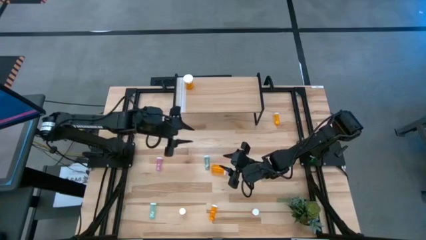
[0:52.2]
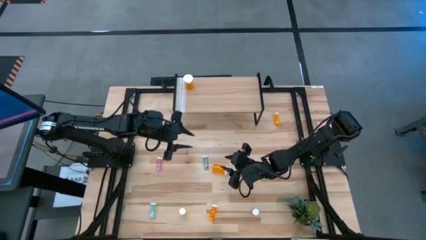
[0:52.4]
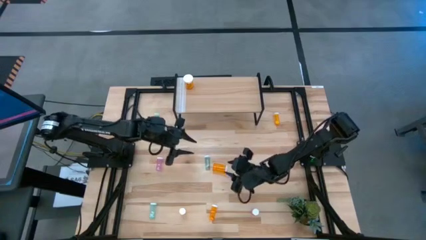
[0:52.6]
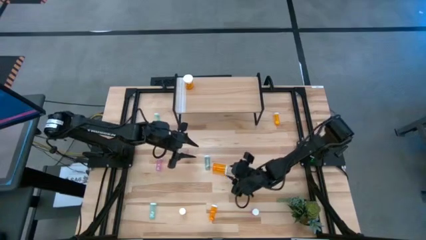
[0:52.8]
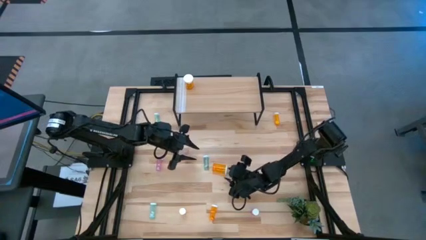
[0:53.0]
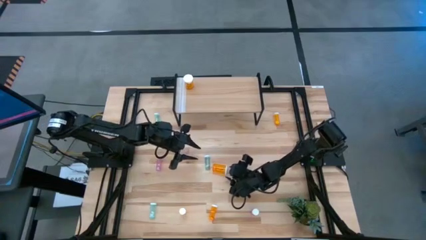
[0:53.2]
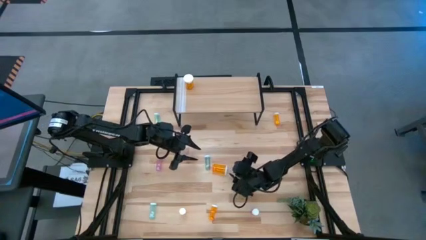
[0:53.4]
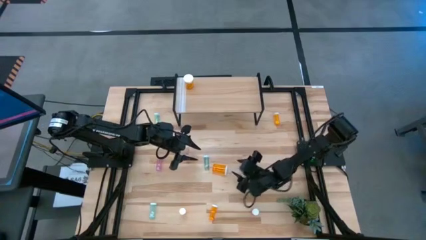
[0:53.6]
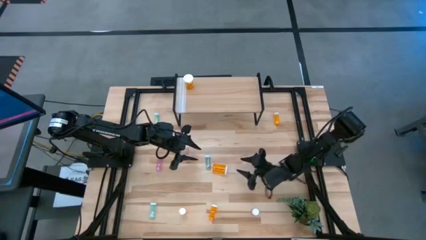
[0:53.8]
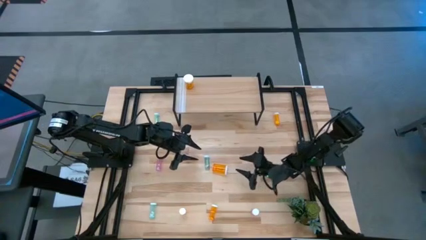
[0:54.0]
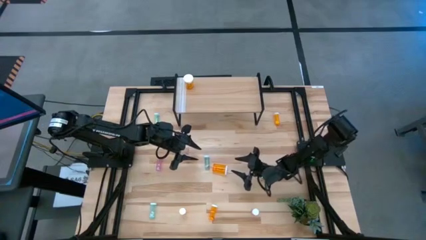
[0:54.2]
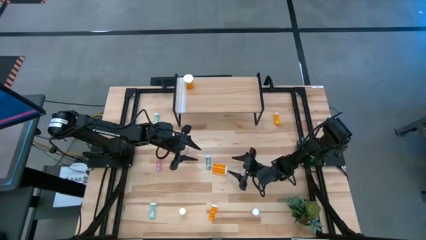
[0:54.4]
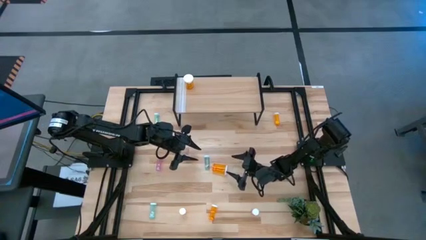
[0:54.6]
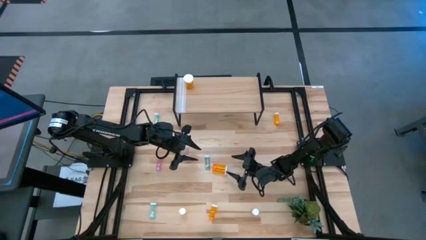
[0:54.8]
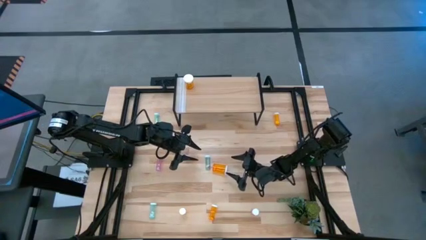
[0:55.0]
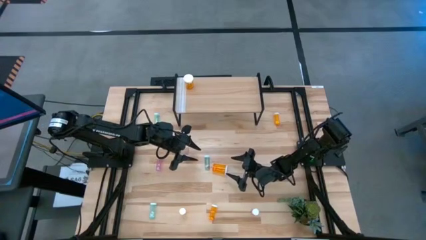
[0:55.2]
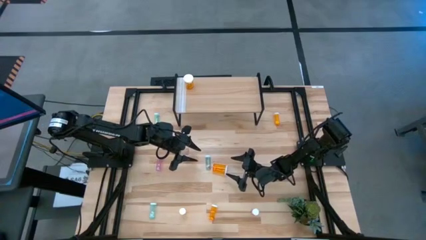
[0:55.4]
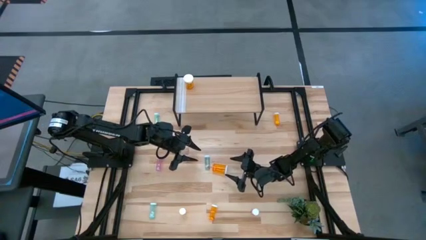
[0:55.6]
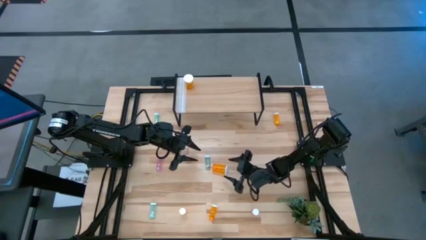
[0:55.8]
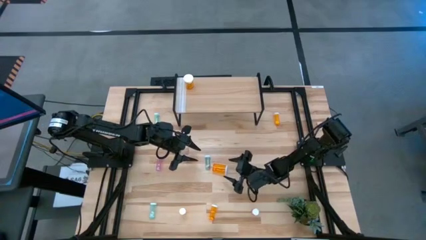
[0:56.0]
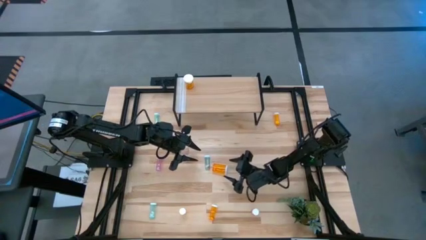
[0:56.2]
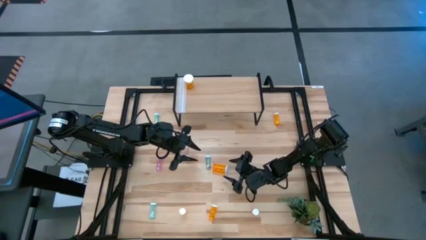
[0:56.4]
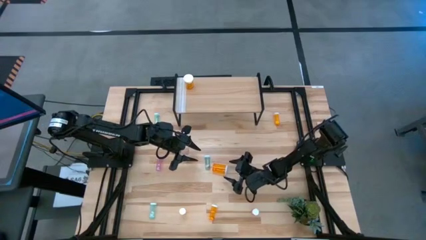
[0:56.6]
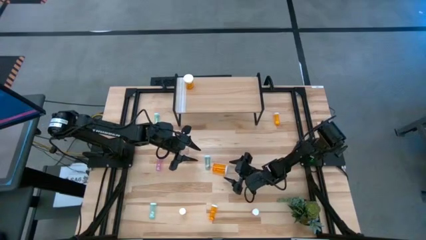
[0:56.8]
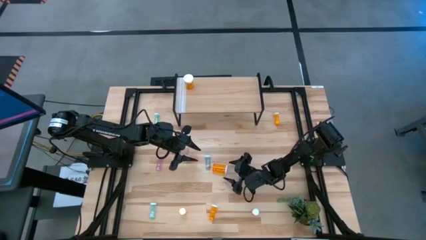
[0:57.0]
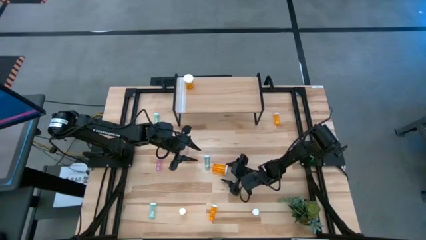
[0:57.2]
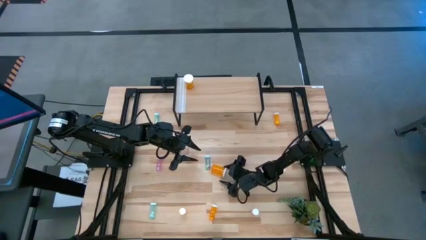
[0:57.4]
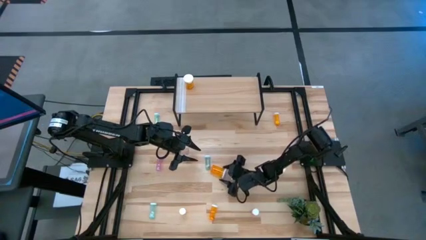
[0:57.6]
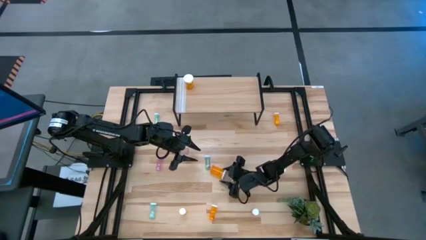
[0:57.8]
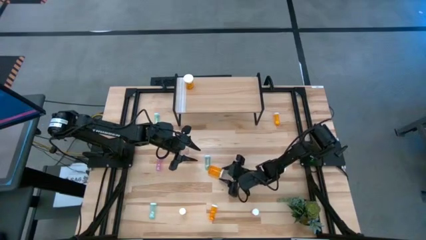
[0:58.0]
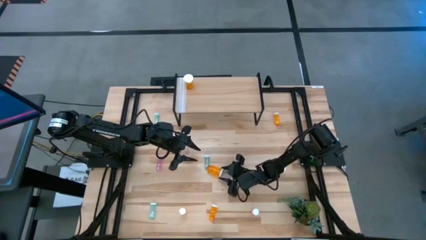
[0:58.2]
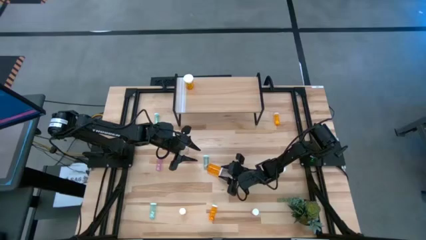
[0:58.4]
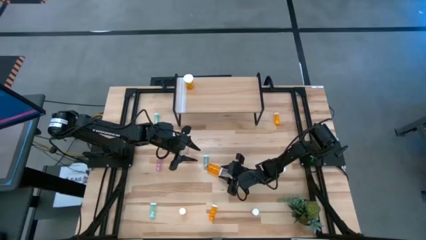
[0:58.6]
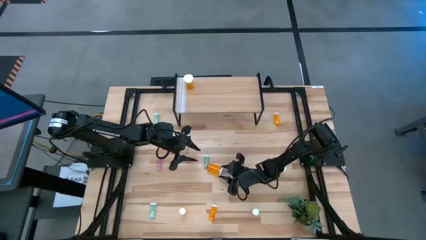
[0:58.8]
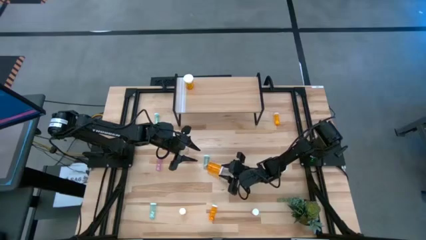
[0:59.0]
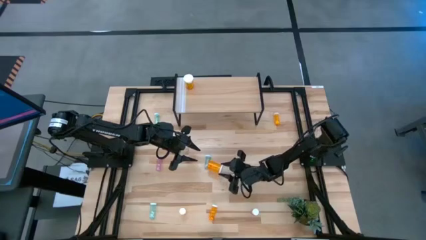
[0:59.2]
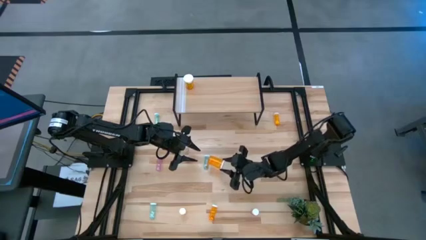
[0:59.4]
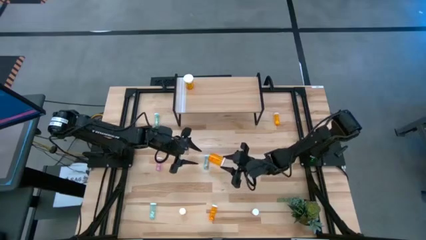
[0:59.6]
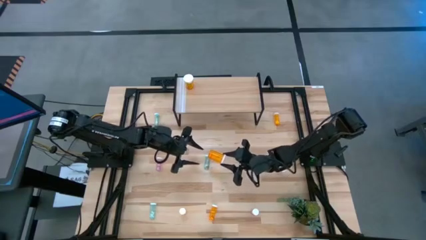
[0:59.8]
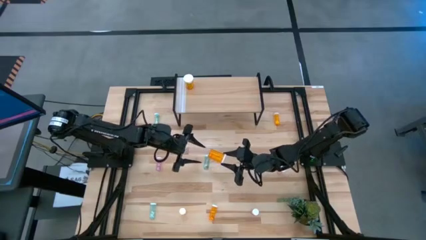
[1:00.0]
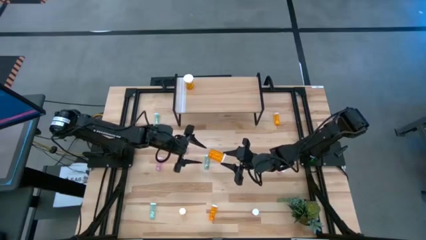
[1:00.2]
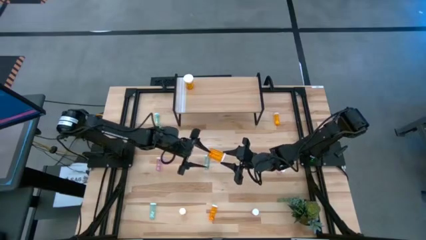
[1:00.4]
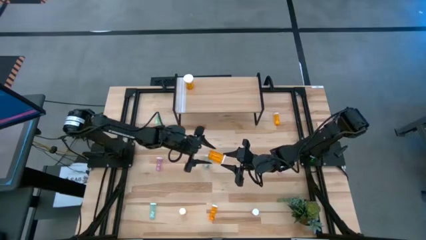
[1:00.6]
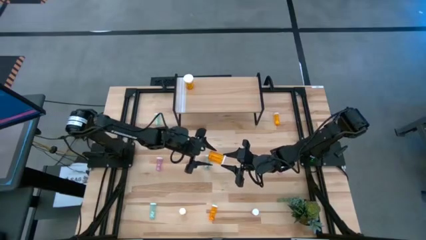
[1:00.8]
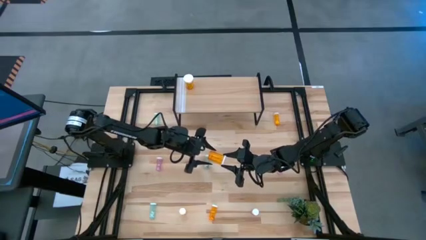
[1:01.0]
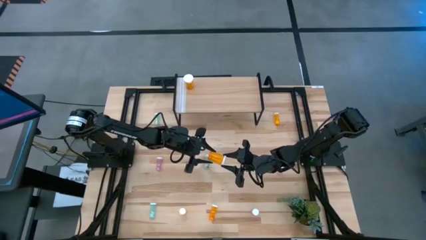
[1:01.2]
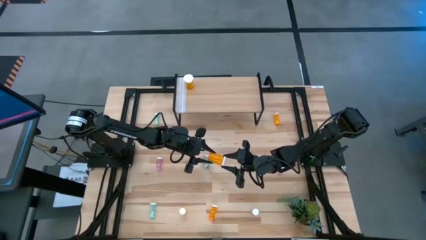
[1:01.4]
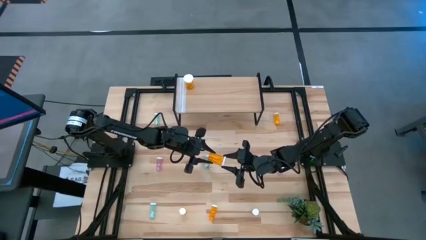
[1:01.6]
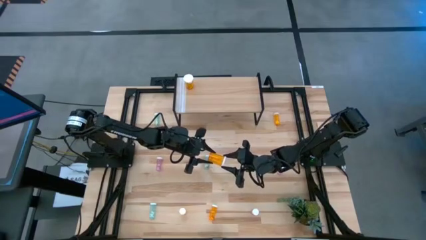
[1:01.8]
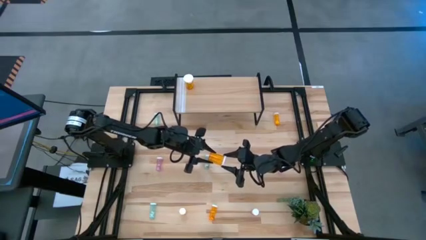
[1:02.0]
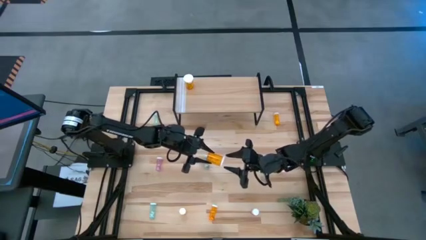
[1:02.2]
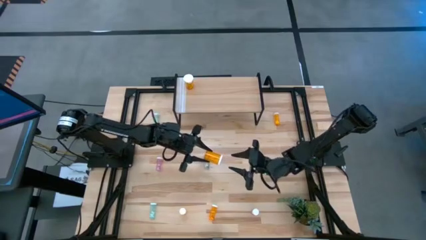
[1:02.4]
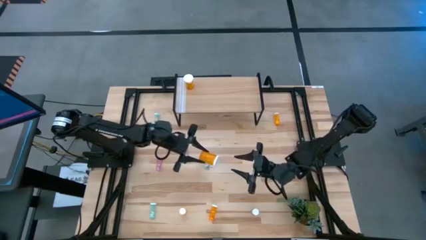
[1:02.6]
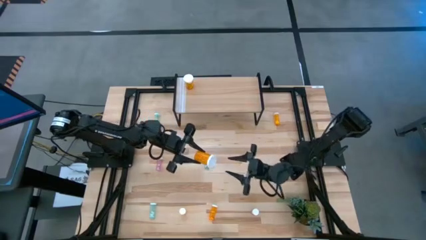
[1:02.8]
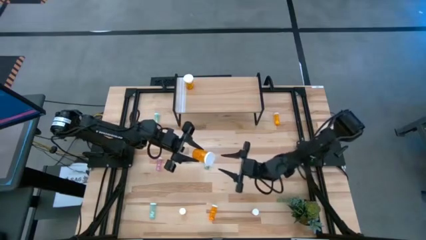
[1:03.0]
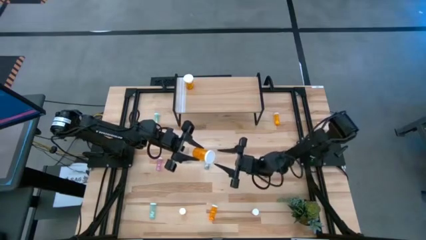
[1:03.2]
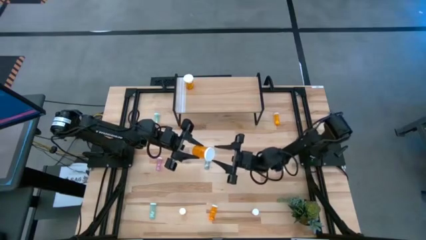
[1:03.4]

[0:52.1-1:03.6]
Task: Pick and place medicine bottles onto shelf by color
Put the large orange pill bottle aligned with the other large orange pill bottle on the shelf

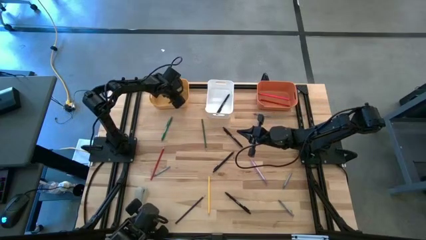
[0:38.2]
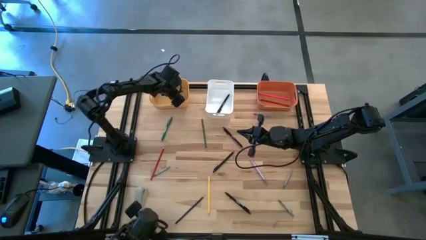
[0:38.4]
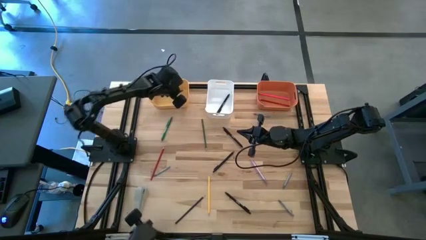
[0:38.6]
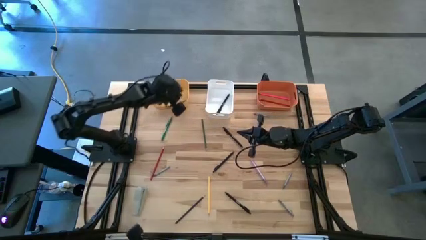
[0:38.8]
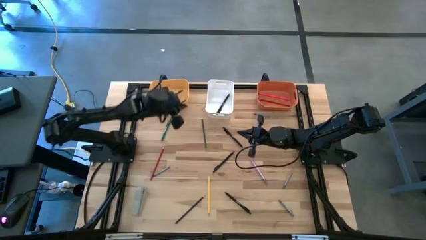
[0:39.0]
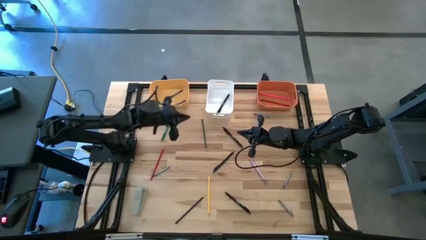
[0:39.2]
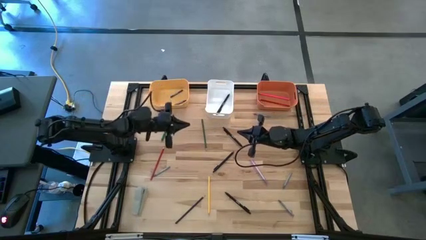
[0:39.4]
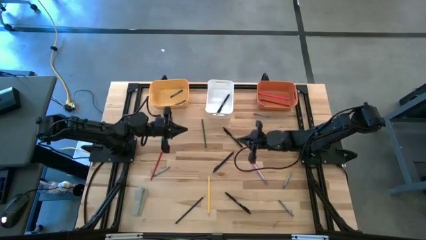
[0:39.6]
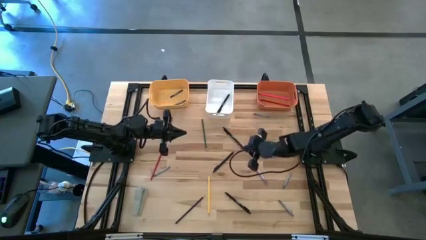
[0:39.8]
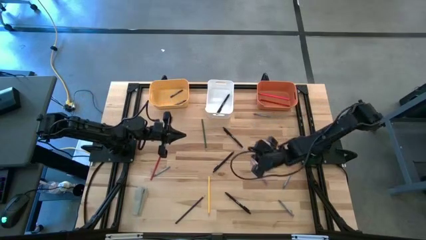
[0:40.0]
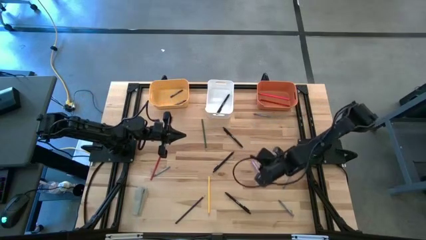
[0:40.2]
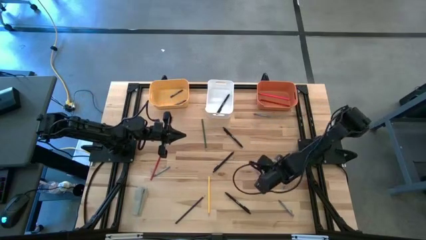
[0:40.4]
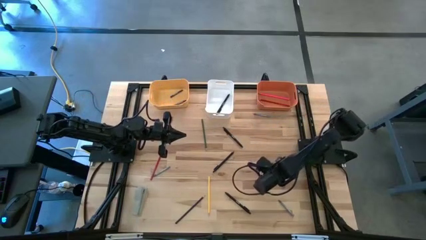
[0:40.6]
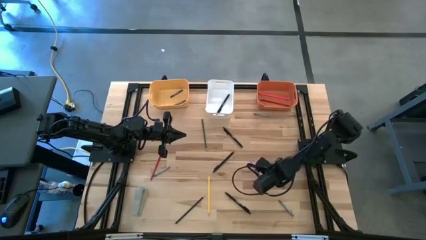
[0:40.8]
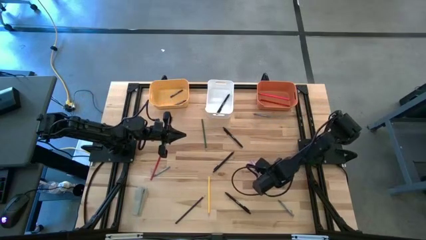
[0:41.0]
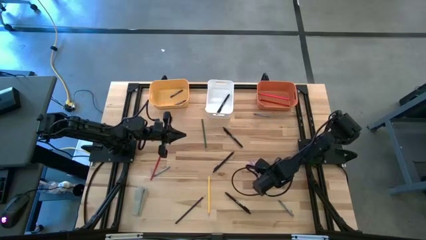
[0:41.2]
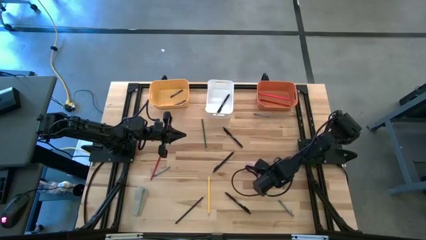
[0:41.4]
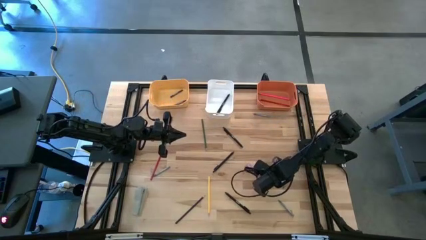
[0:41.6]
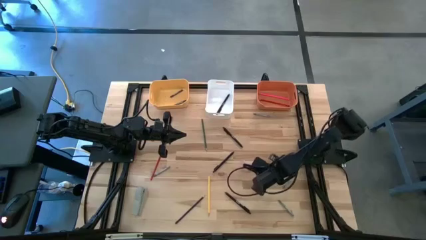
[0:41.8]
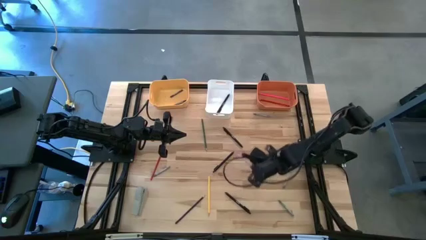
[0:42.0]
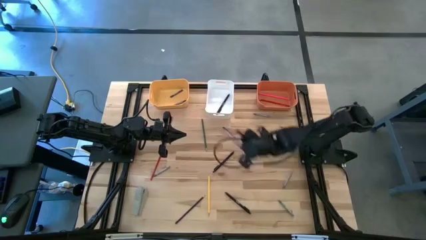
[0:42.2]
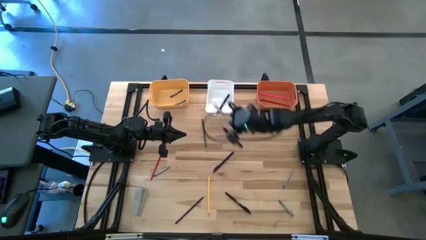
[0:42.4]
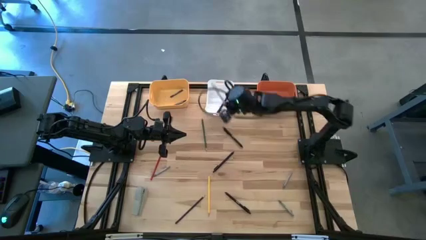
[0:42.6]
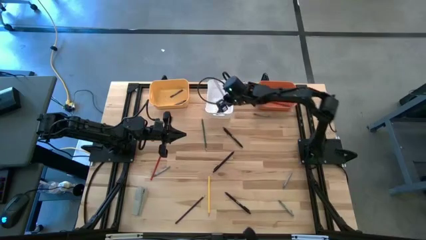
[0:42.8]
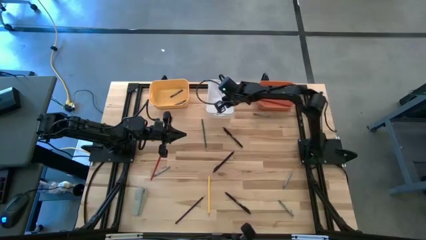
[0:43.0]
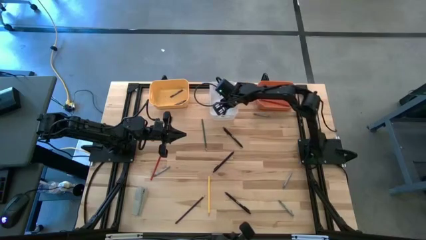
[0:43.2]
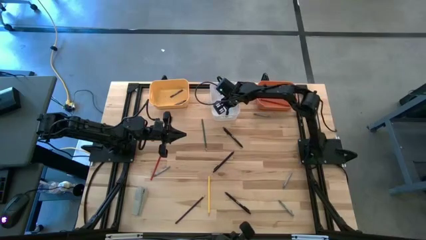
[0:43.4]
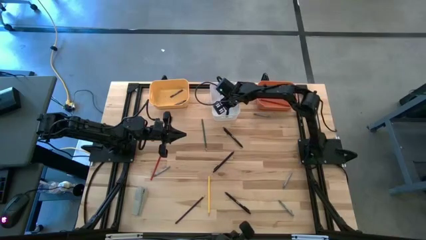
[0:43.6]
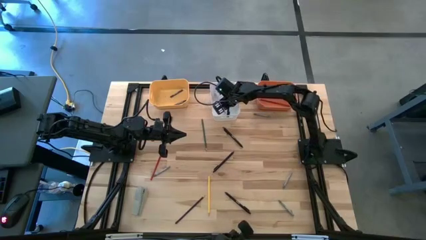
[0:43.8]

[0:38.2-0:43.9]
Task: Sort crayons/erasers/pens/pencils in bins
Put the pink pen into the white bin

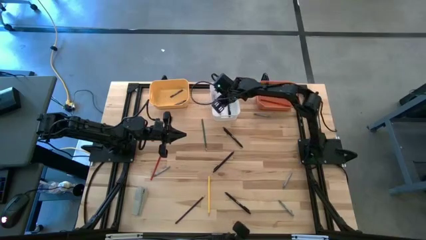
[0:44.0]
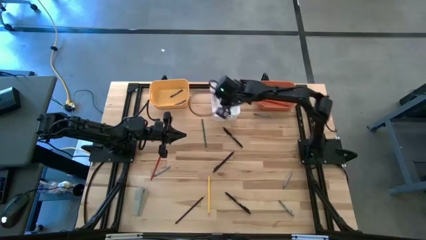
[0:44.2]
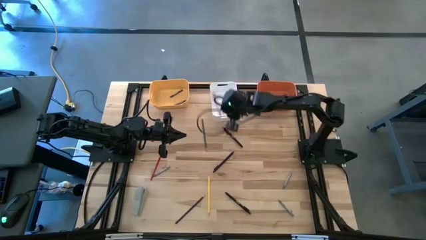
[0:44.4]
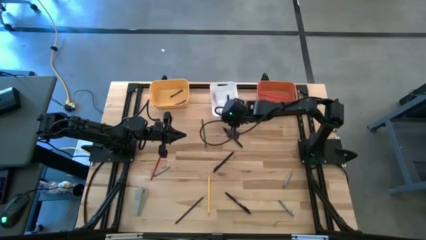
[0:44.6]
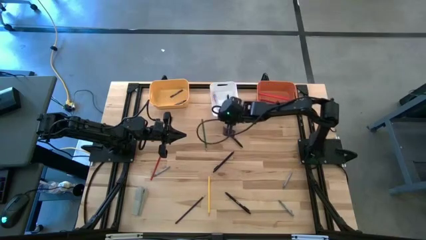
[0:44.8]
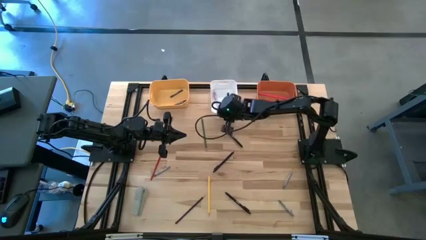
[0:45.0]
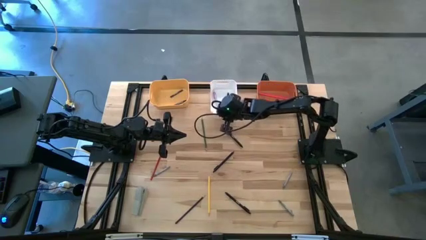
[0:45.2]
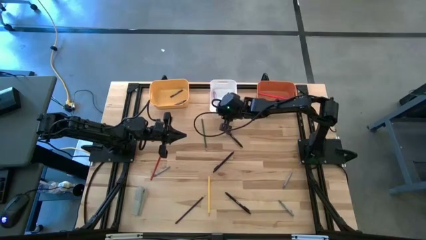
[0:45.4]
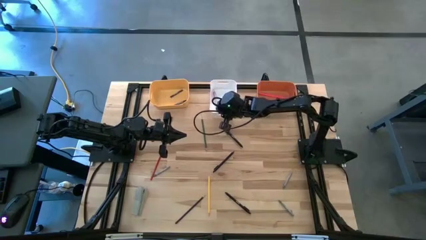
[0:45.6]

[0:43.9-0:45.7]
Adjust the white bin
